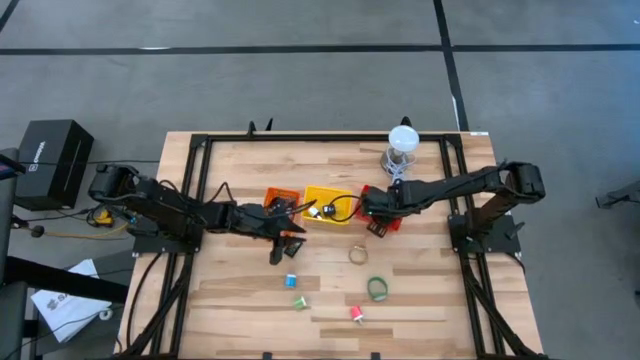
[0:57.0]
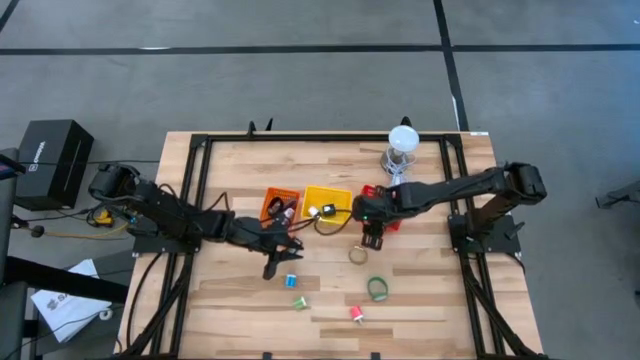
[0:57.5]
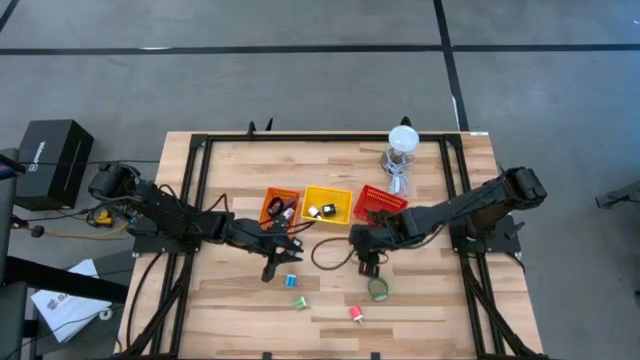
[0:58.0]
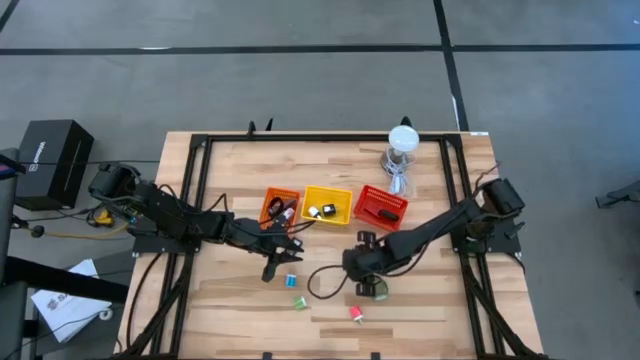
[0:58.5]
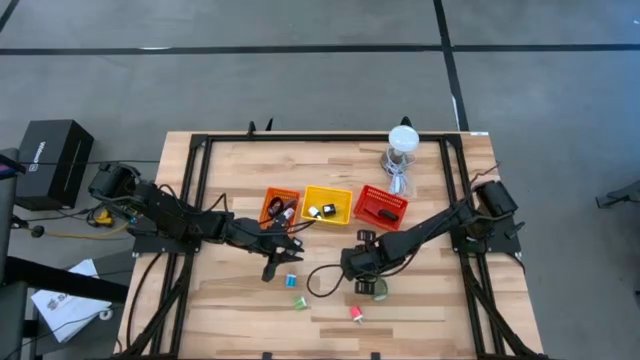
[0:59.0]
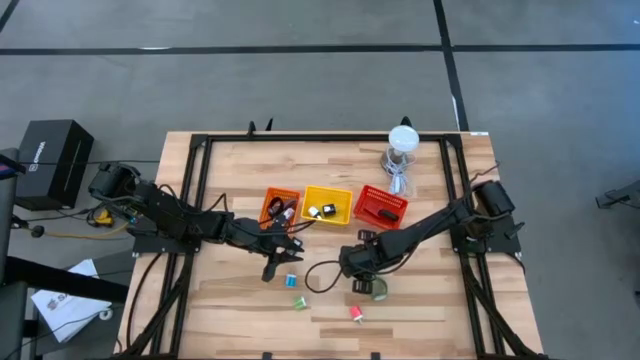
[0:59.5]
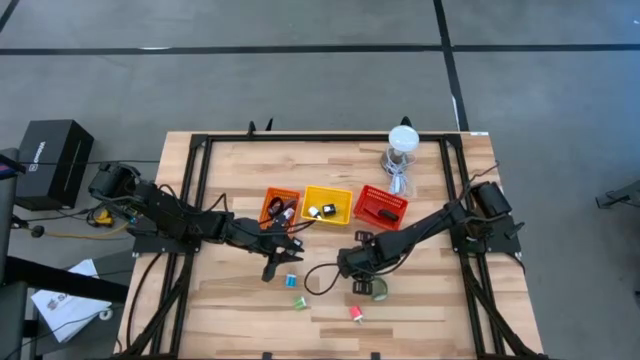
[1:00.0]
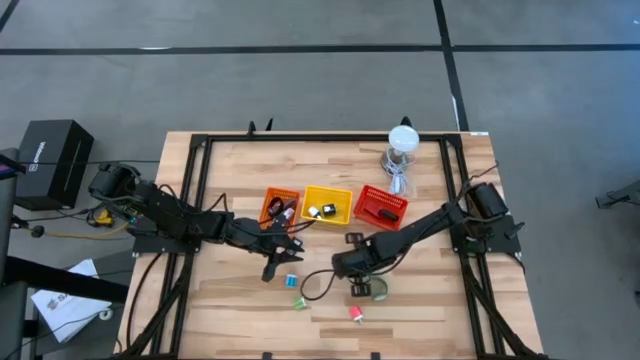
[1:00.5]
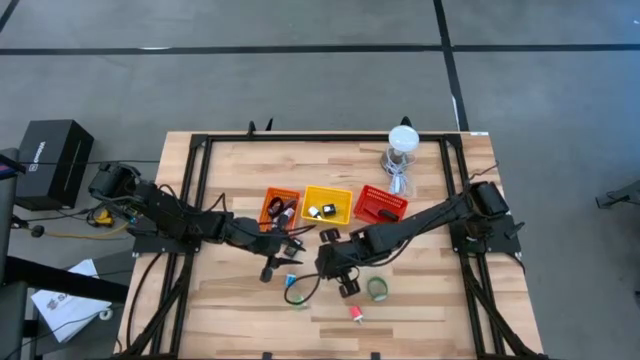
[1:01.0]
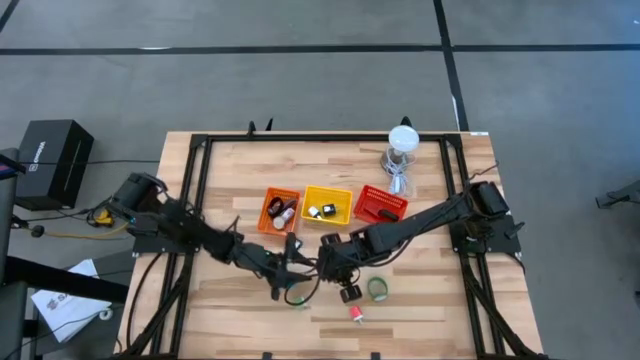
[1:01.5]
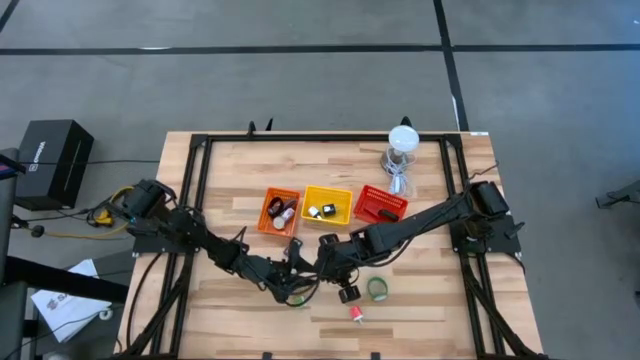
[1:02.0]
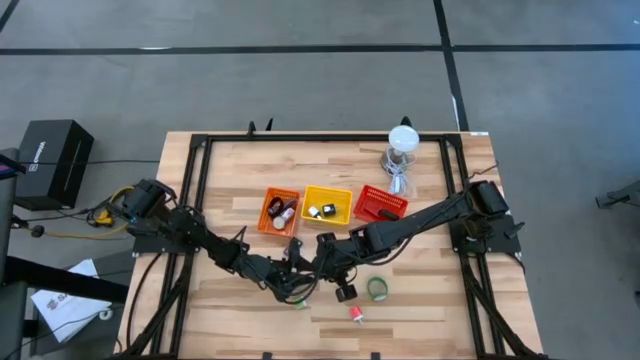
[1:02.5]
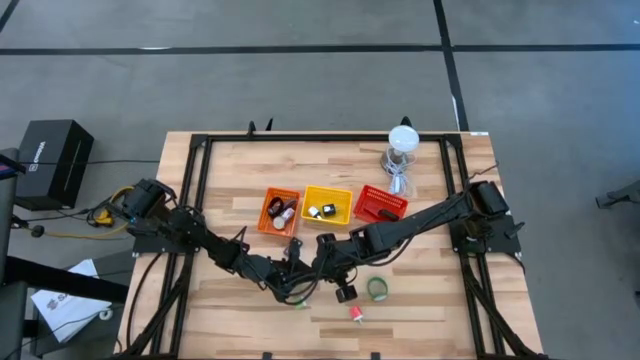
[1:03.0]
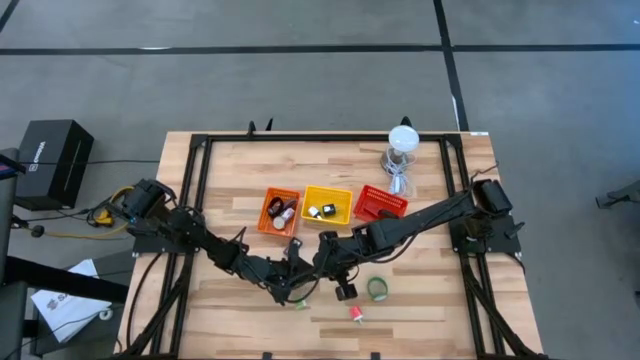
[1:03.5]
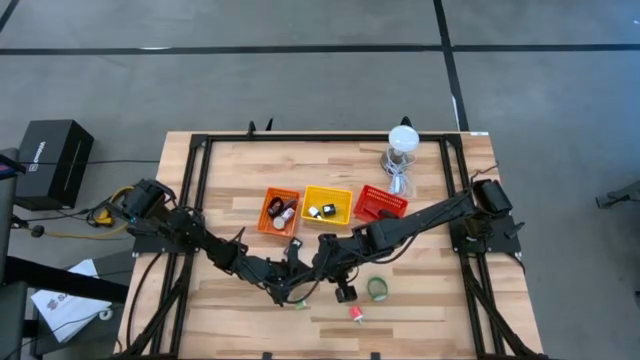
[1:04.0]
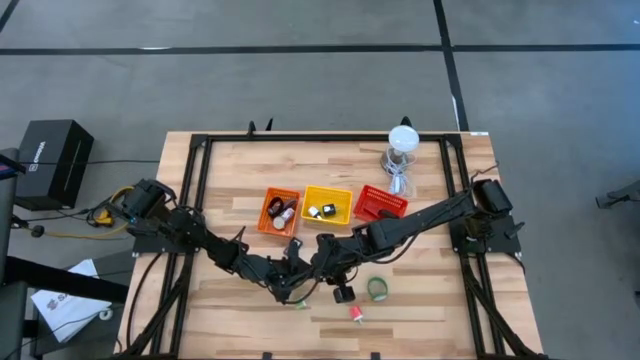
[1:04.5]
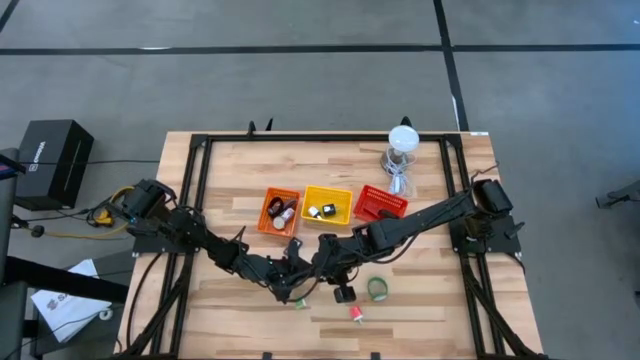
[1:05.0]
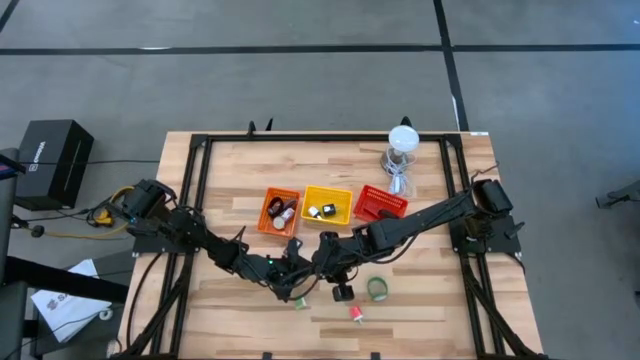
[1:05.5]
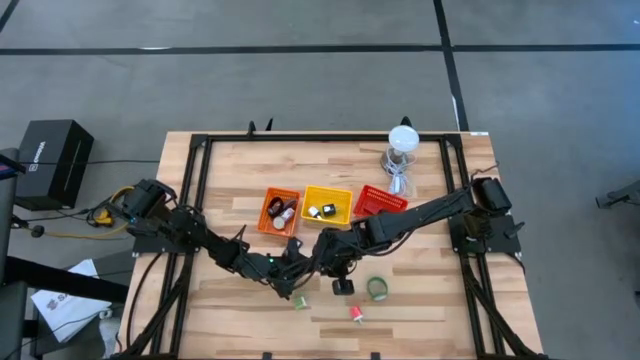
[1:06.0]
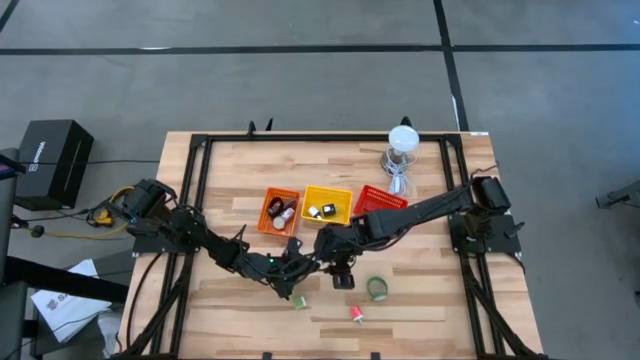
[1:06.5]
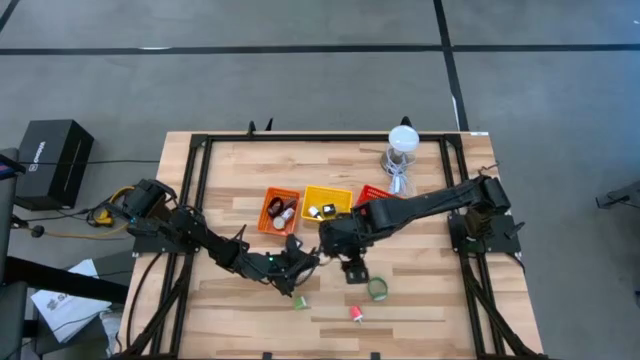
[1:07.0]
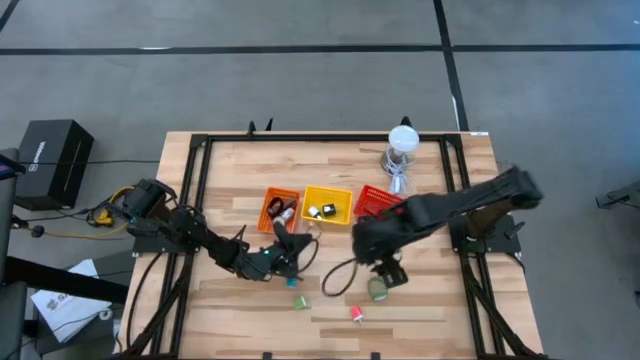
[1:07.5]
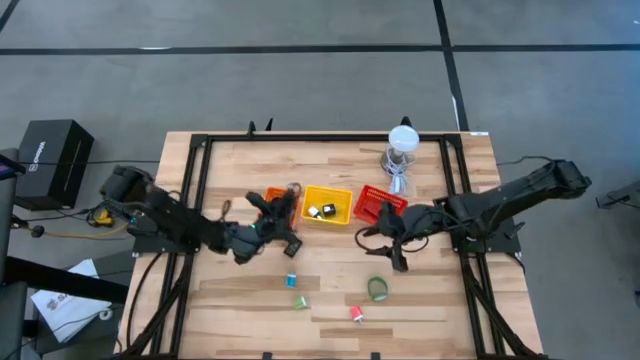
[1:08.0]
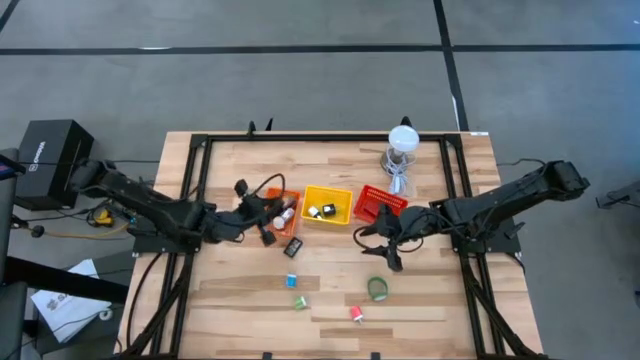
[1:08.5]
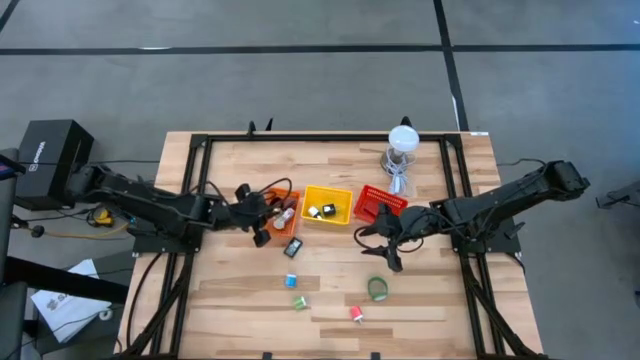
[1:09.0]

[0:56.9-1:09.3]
Task: Pick & Place Office items
Put the gold wristwatch into the orange bin

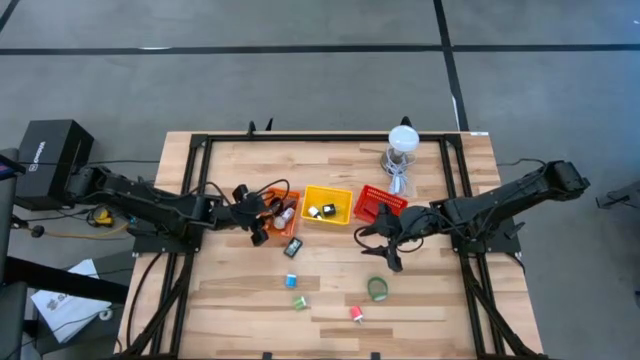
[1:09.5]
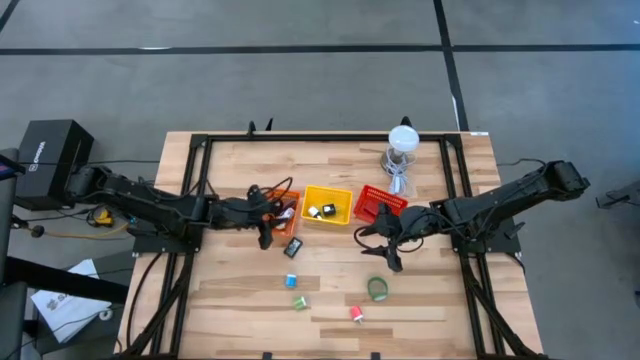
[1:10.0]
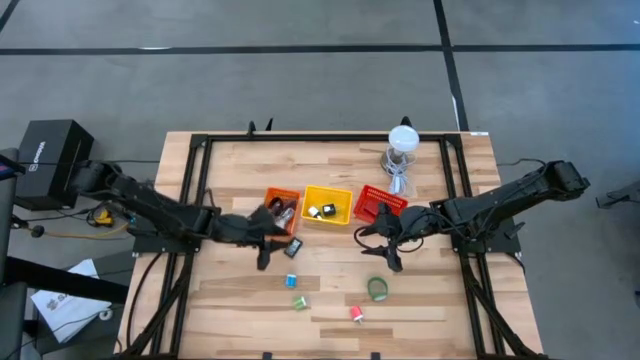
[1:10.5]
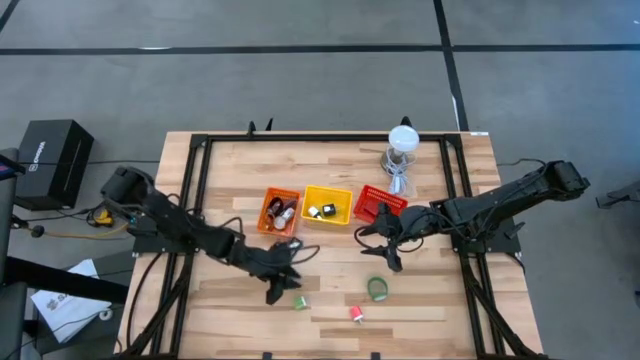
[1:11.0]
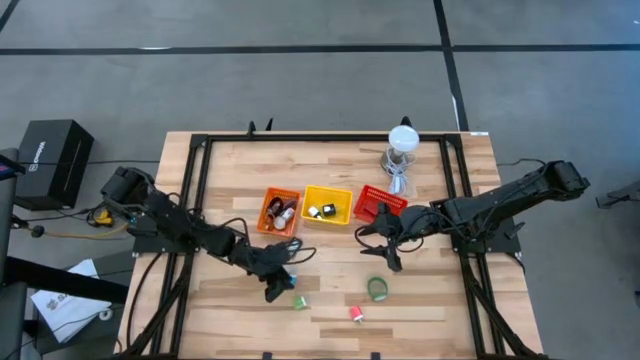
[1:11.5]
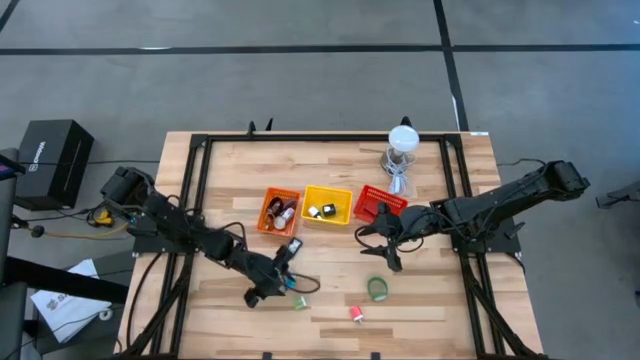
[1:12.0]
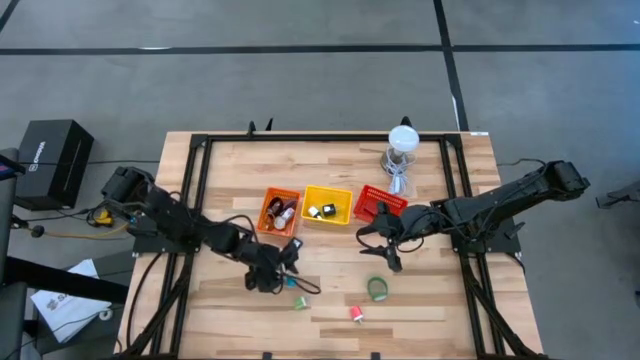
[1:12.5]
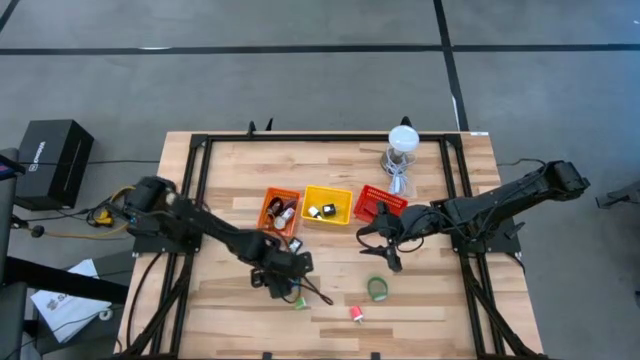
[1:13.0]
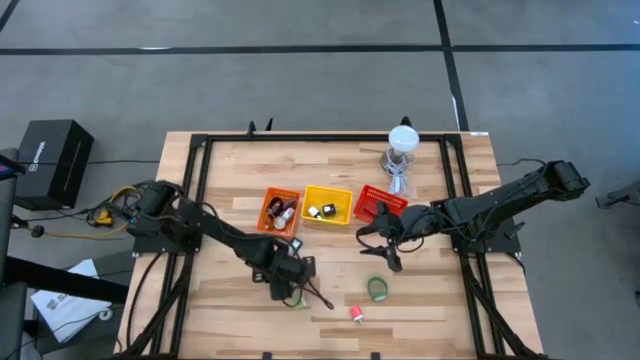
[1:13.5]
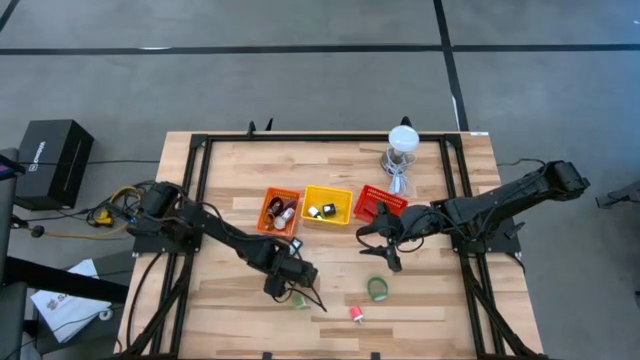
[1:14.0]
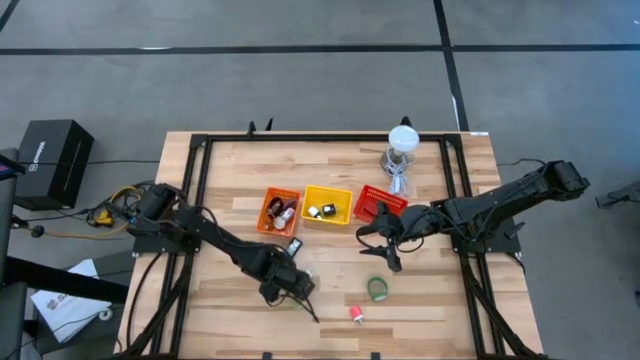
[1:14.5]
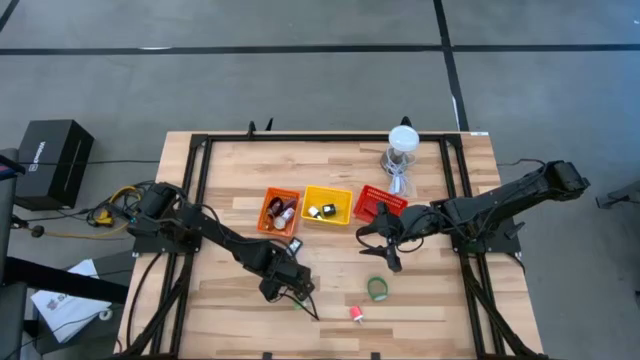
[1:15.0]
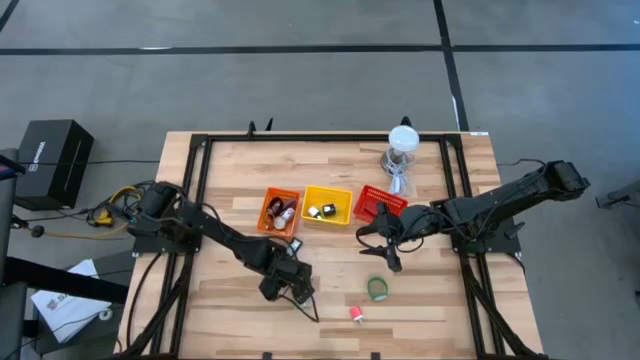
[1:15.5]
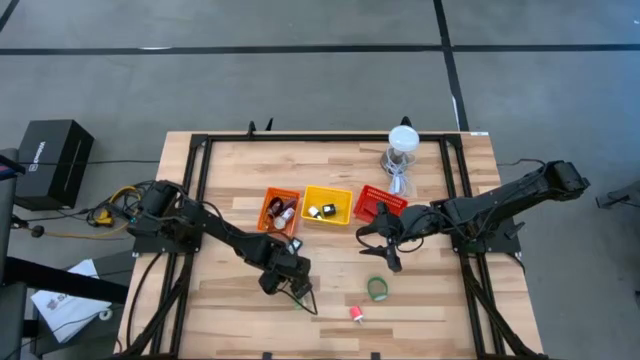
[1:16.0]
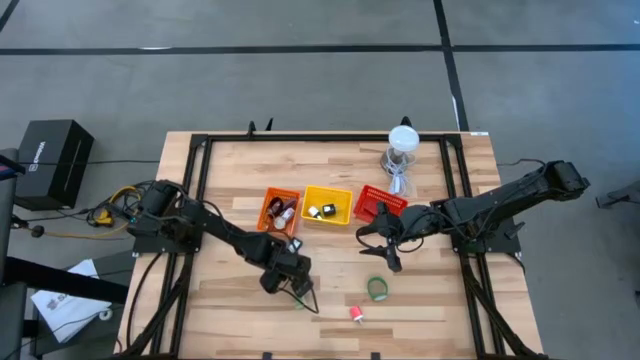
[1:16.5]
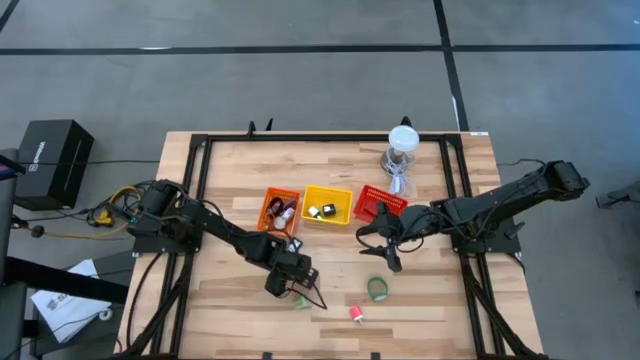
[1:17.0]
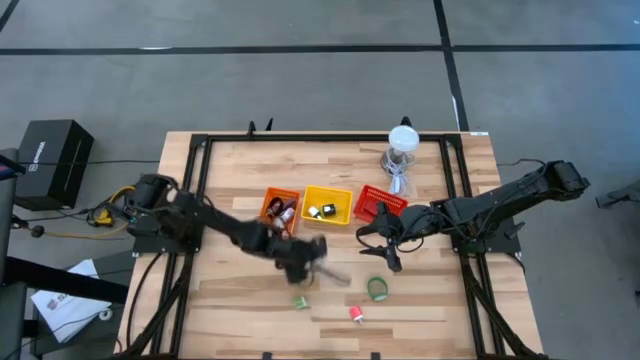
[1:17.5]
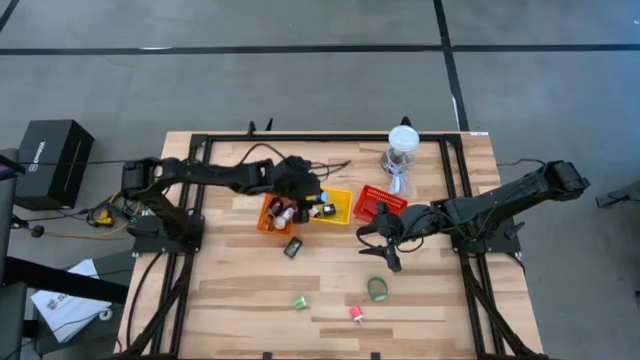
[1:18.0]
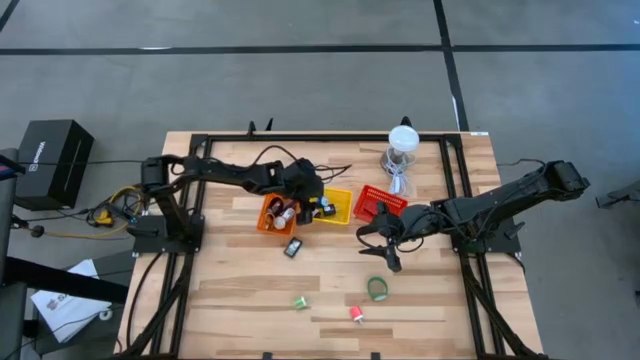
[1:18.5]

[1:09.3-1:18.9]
Put the blue charger adapter into the yellow bin

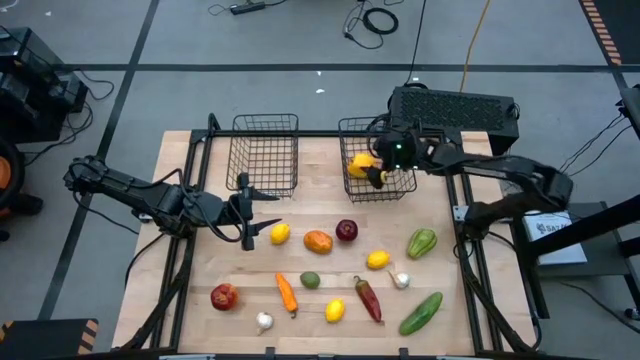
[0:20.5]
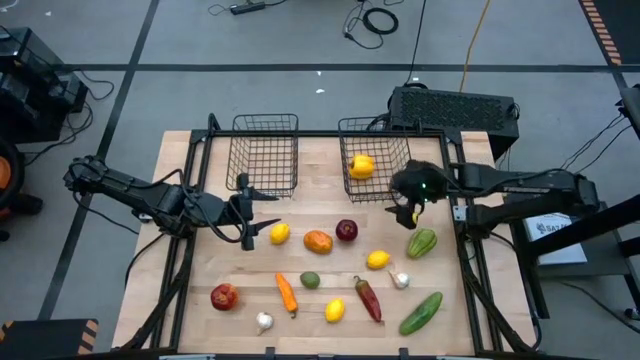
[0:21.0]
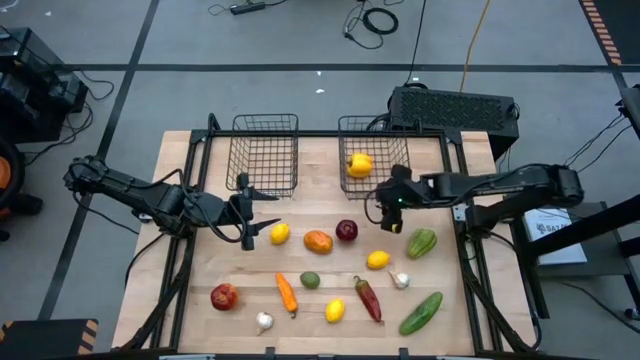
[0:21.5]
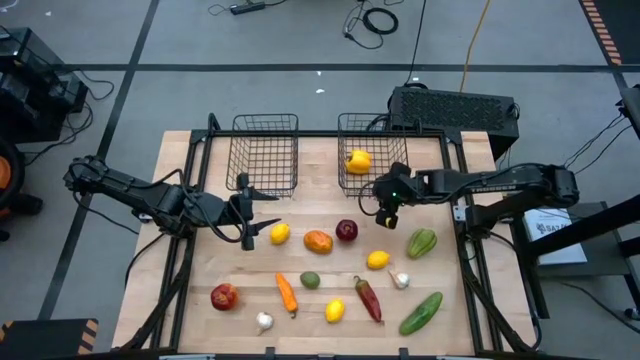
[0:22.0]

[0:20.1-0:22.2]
Task: Sort produce into baskets
Adjust the right mesh bin
